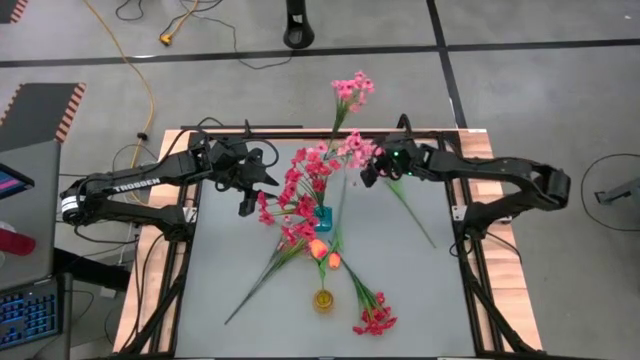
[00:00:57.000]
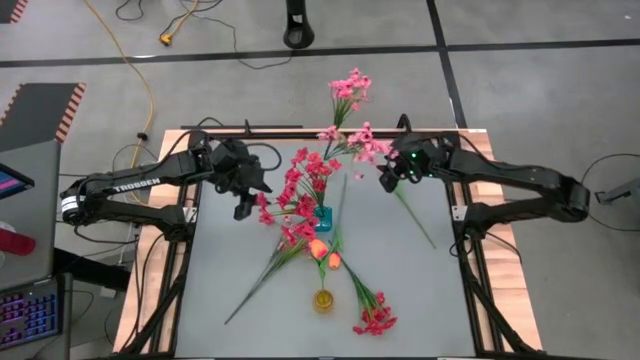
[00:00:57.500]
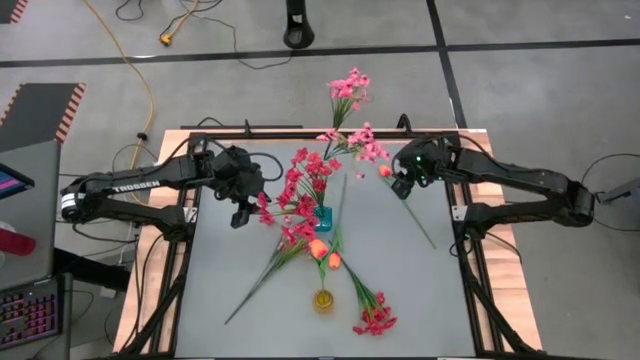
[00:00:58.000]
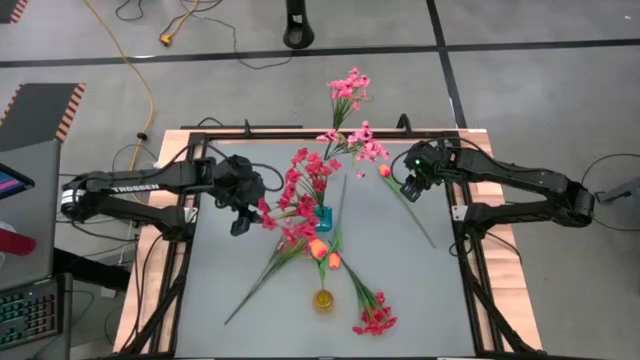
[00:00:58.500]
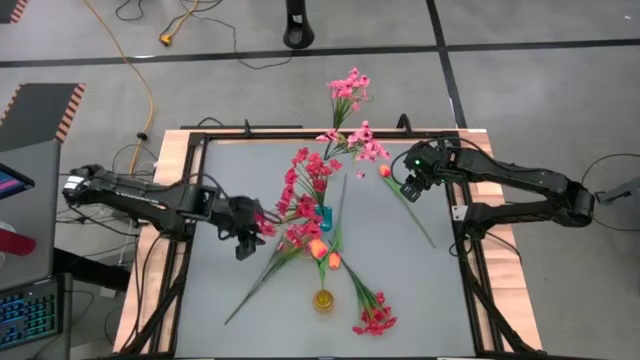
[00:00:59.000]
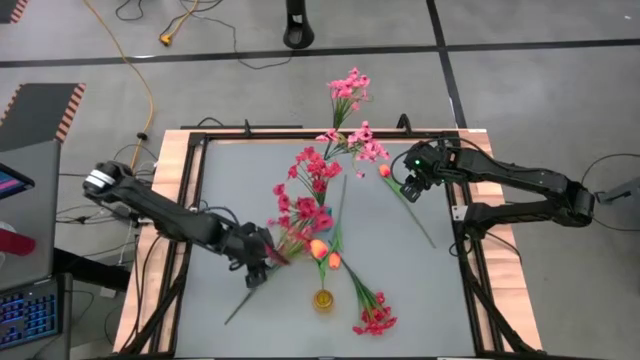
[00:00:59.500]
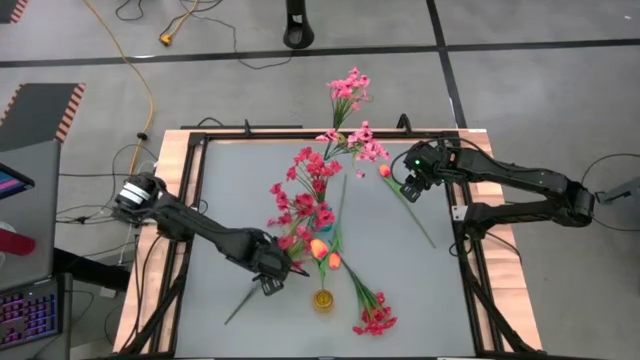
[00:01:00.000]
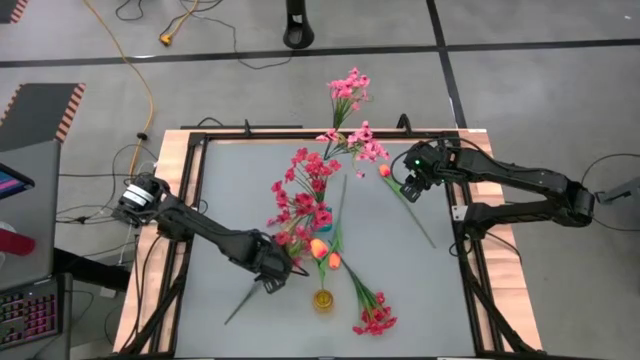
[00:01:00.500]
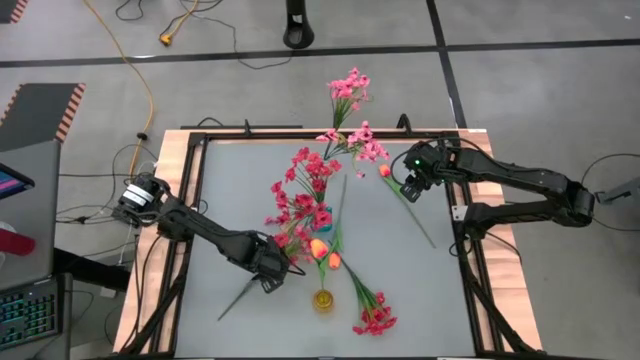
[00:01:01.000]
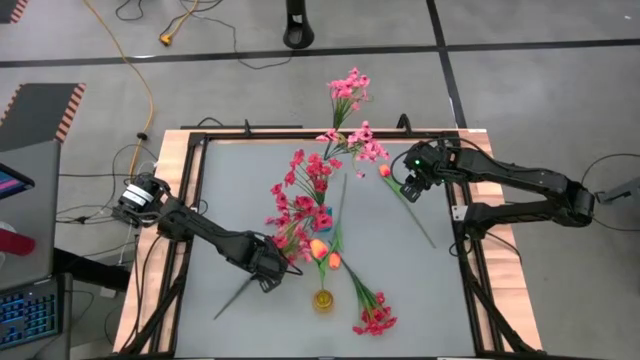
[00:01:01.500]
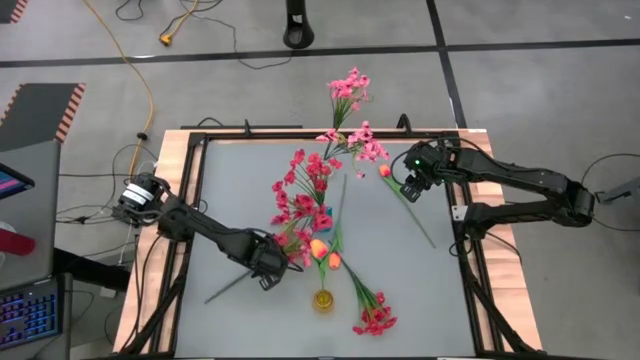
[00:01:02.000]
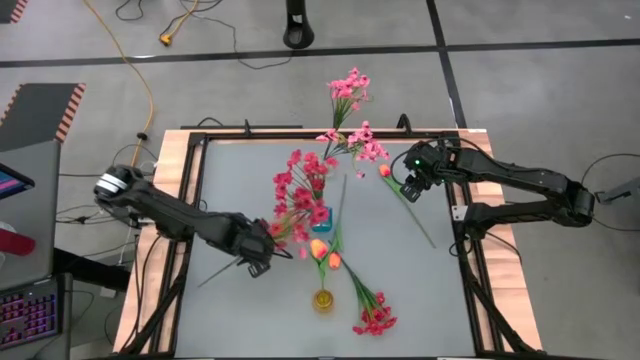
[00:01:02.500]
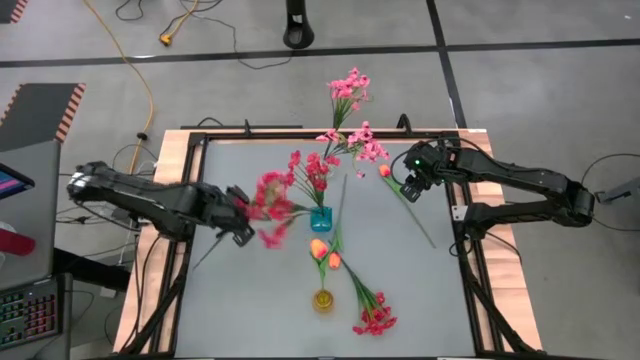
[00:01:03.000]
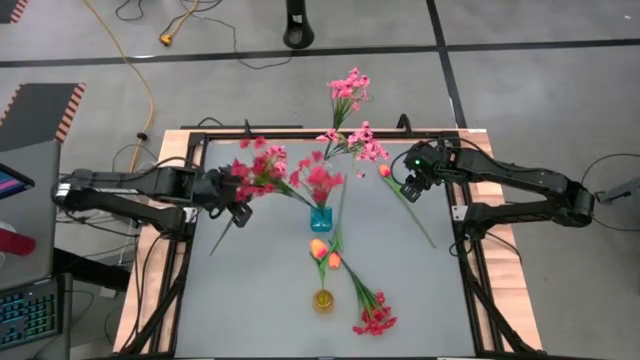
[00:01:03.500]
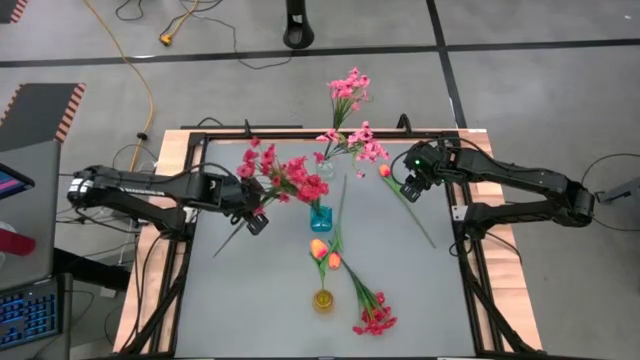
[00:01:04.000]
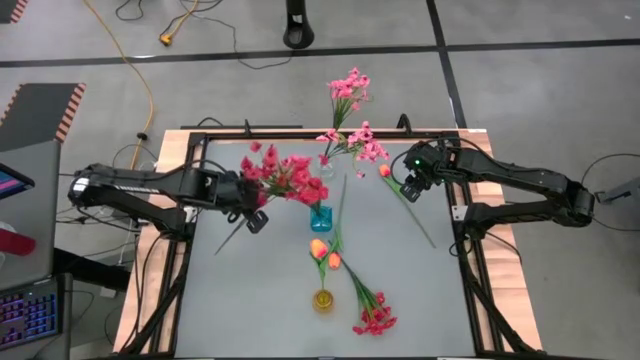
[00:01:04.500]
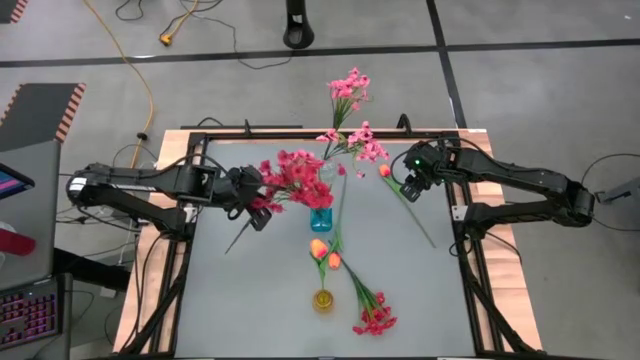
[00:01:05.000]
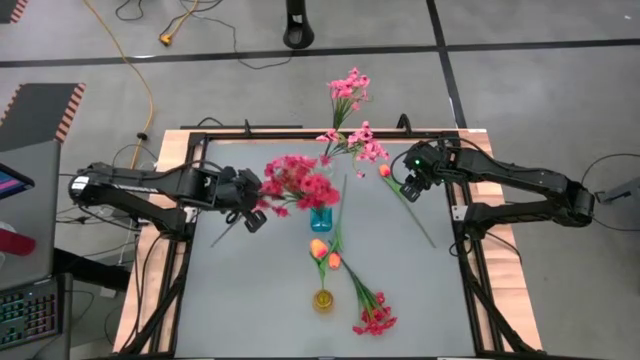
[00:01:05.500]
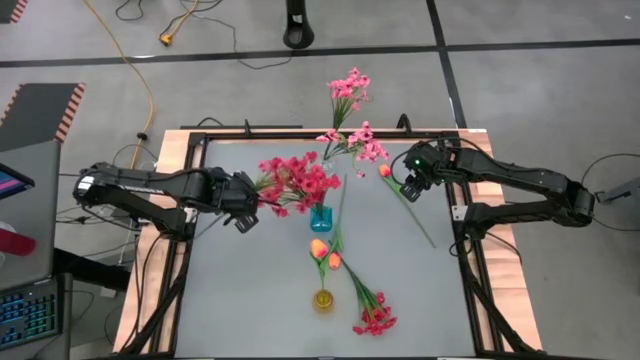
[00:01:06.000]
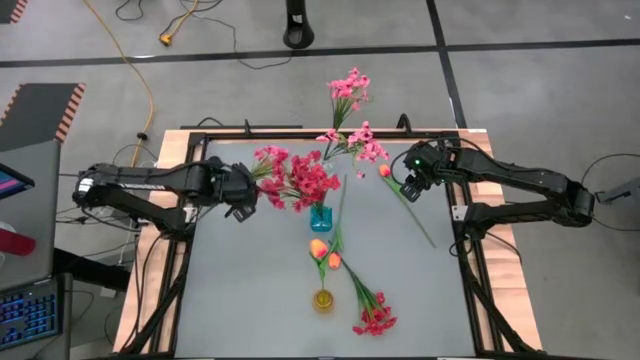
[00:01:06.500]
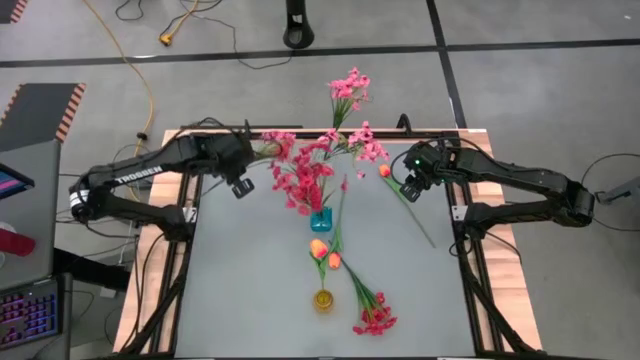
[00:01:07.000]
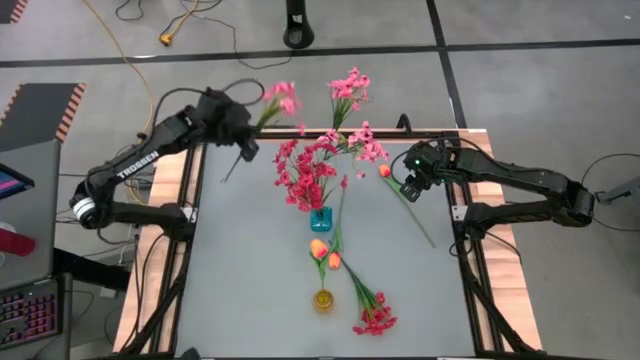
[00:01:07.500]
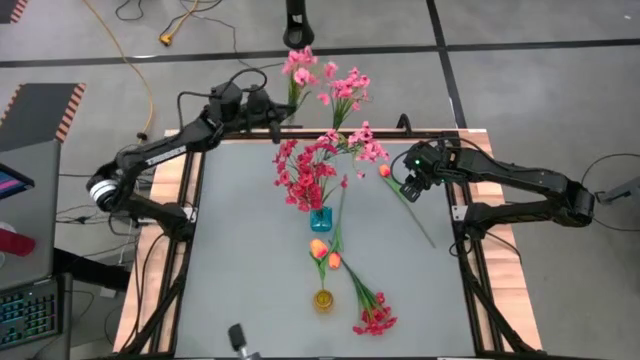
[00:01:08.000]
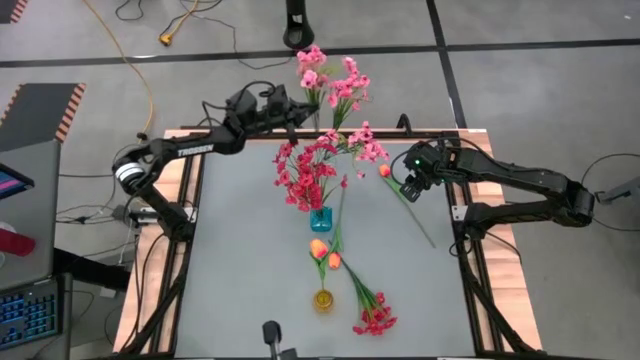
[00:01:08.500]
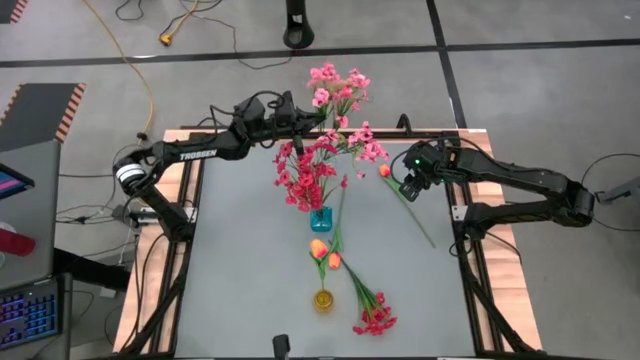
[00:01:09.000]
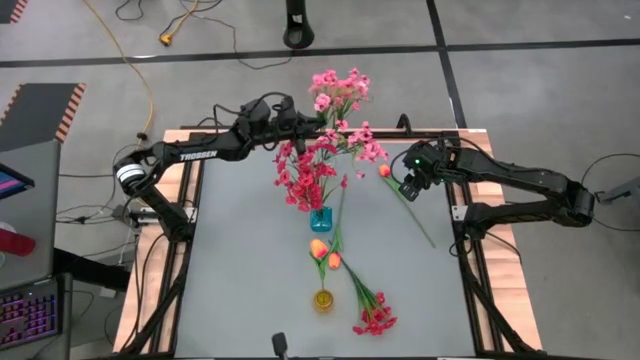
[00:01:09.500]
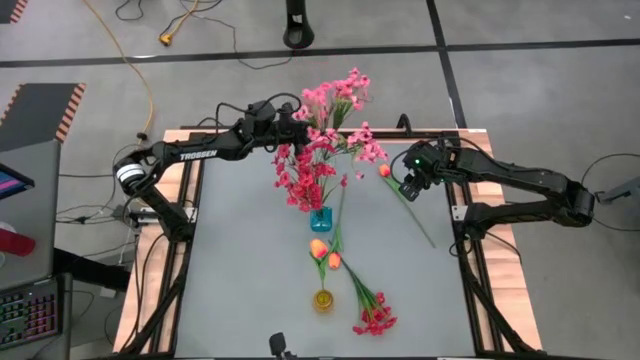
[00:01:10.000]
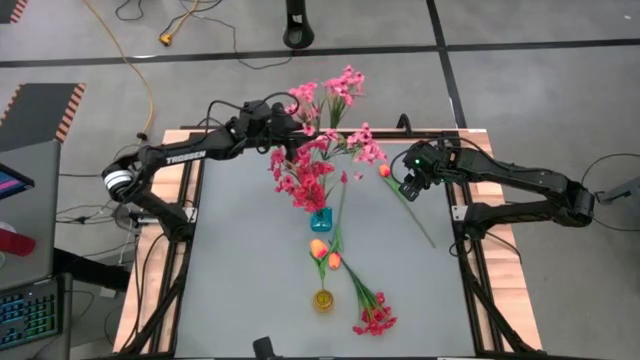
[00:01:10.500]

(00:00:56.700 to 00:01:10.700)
Task: Sort flowers into vase by color
Put the pink flowers into the transparent vase

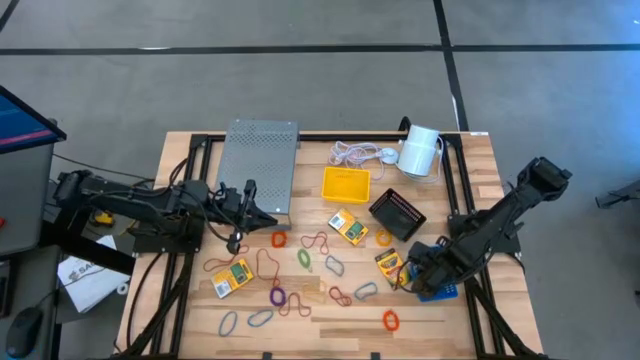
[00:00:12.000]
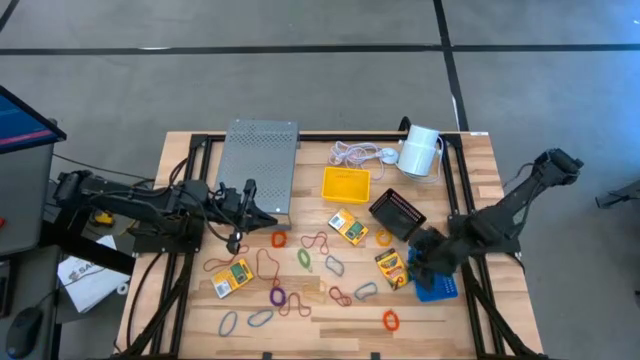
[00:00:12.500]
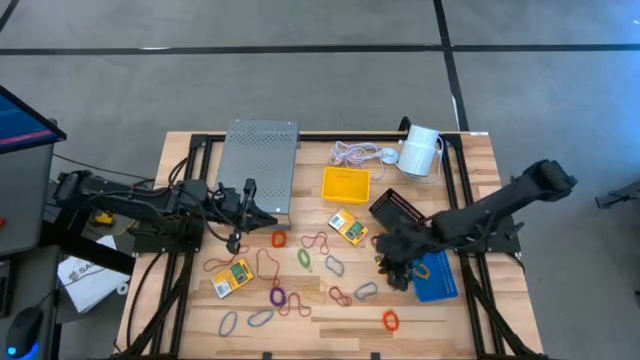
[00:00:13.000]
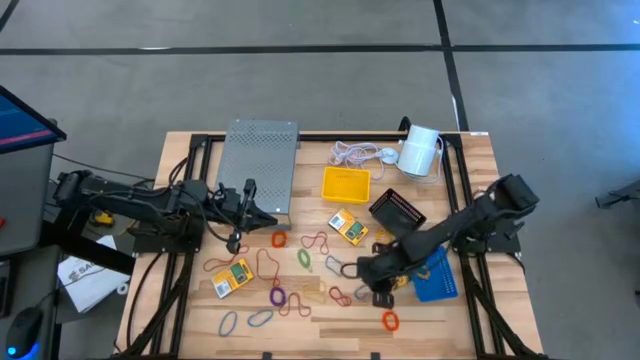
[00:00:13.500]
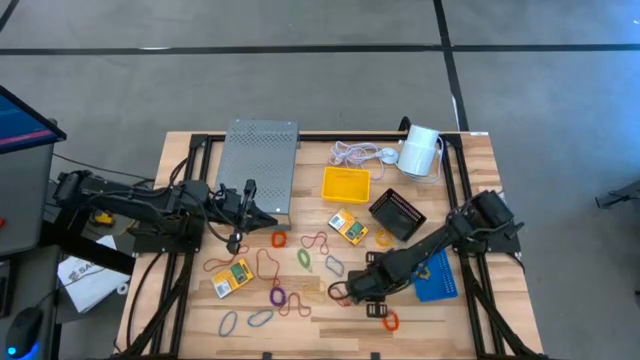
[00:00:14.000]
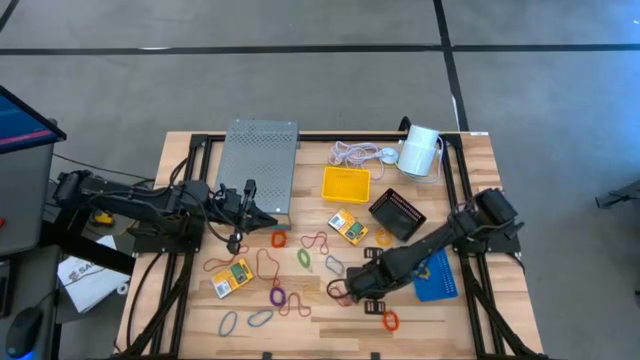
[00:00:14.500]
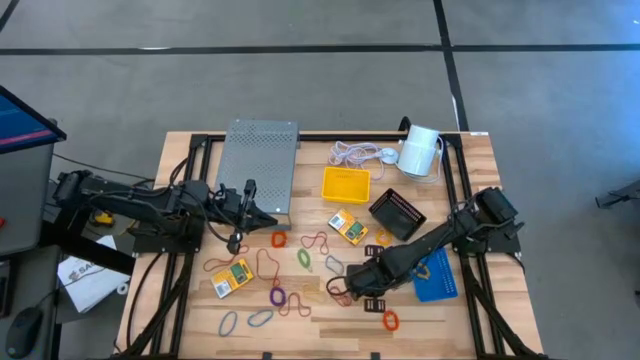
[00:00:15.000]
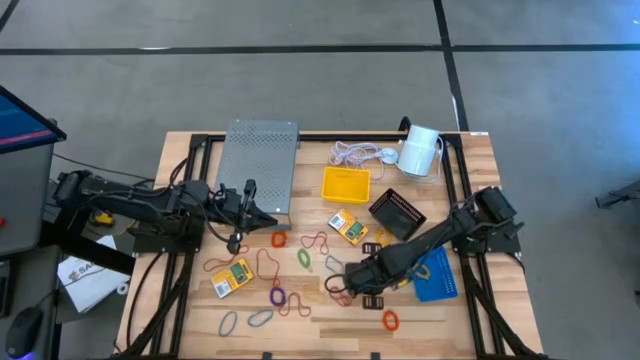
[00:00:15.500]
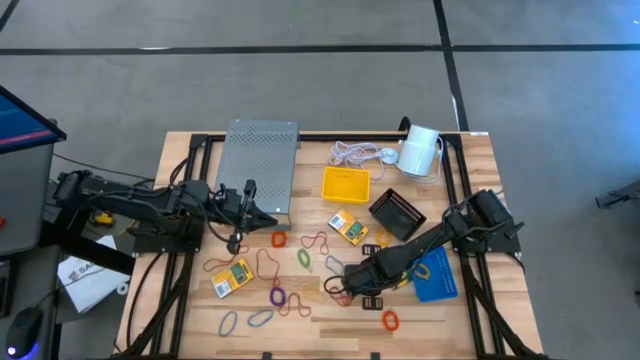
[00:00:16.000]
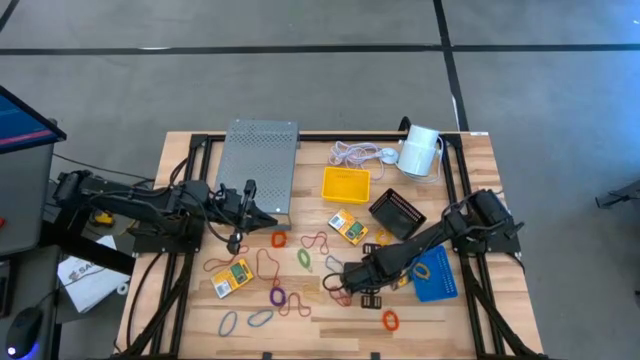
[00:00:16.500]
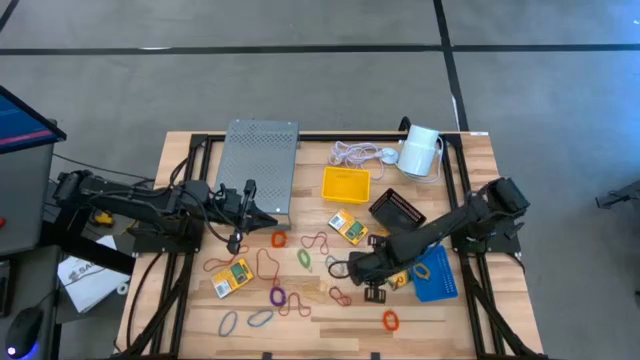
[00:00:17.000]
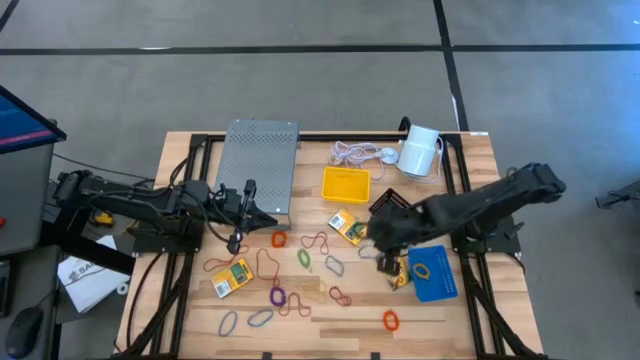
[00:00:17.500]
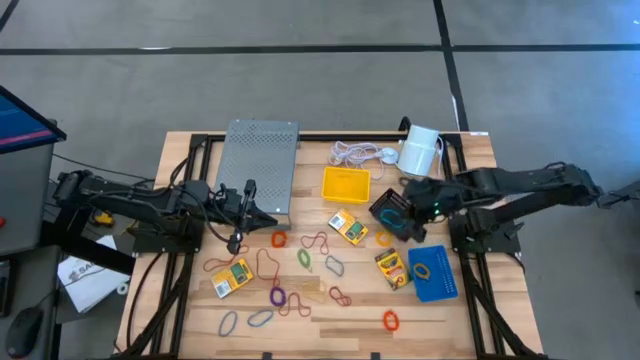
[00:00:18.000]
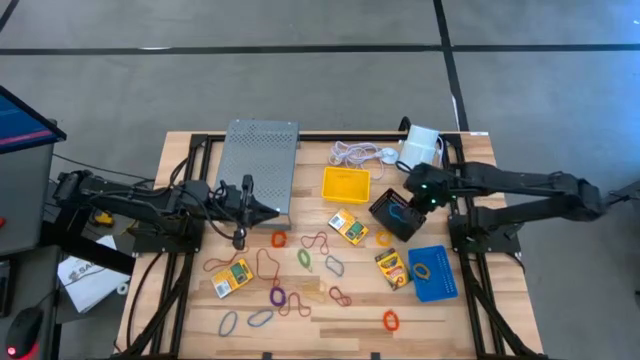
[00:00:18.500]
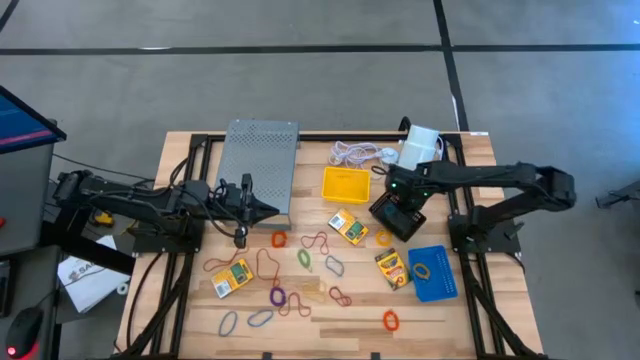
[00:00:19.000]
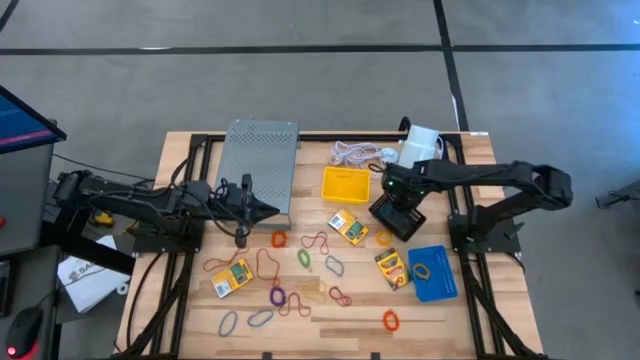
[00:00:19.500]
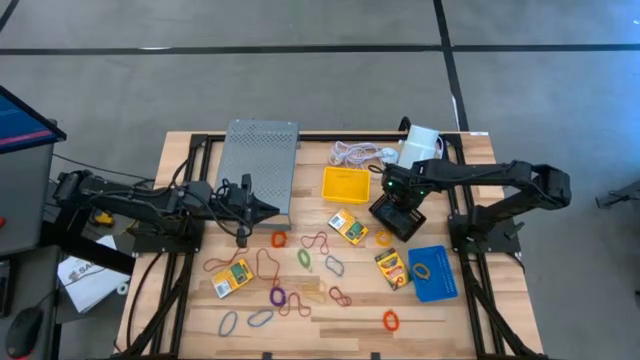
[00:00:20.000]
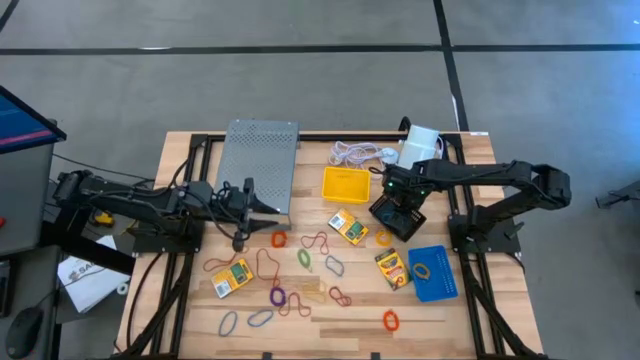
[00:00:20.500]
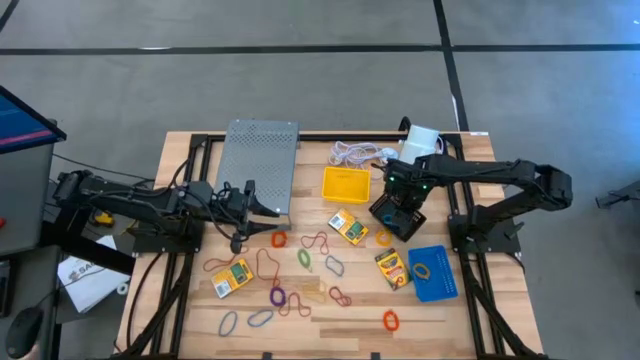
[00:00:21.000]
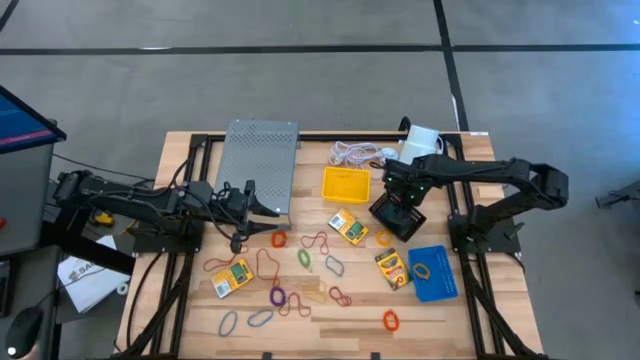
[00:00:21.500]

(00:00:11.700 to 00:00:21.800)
Task: Pick & Place Office Desk Supplies
Put the blue rubber band into the black bin
